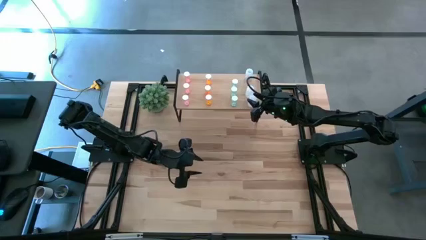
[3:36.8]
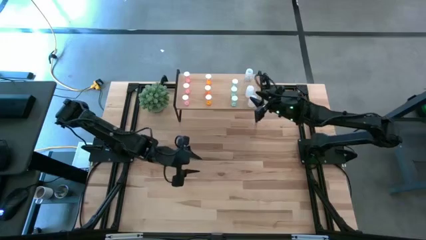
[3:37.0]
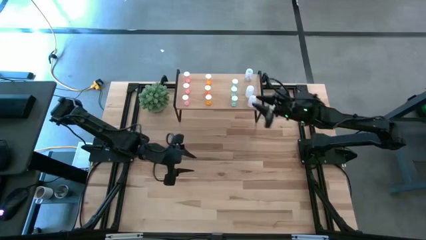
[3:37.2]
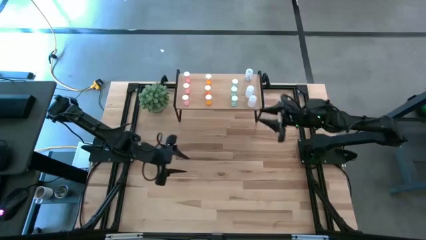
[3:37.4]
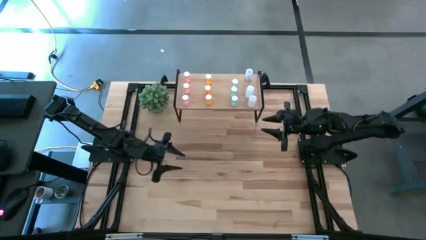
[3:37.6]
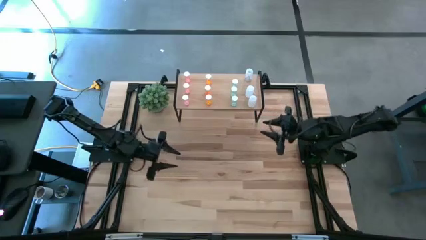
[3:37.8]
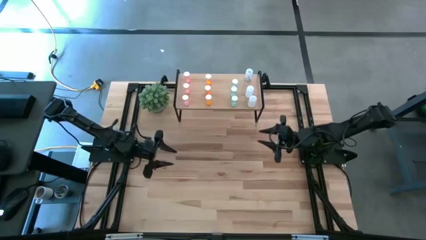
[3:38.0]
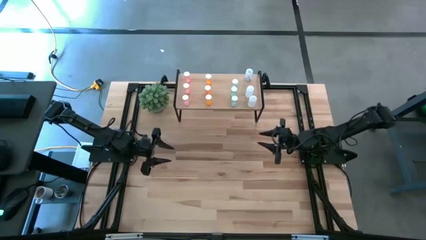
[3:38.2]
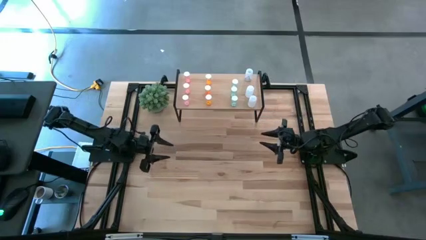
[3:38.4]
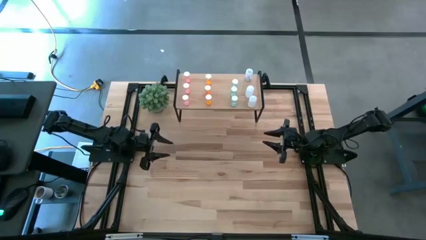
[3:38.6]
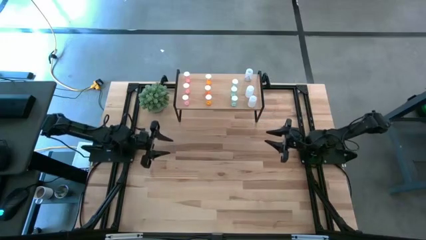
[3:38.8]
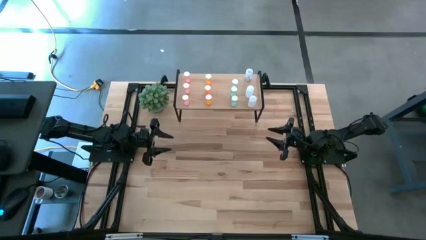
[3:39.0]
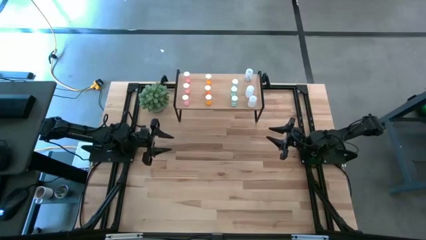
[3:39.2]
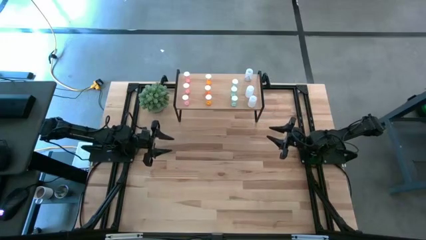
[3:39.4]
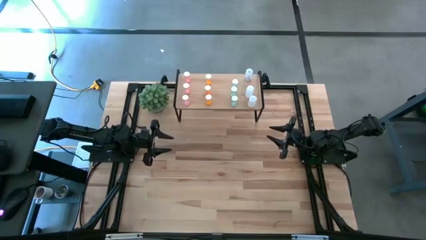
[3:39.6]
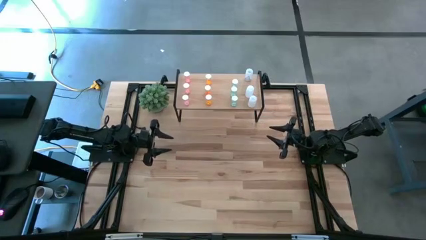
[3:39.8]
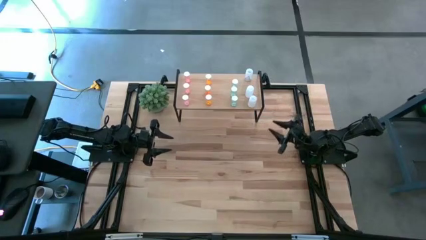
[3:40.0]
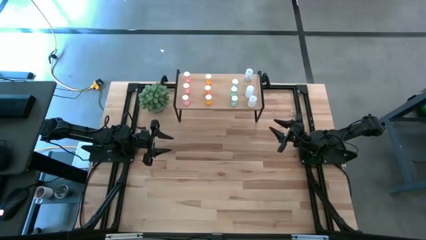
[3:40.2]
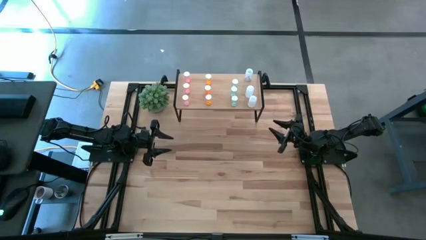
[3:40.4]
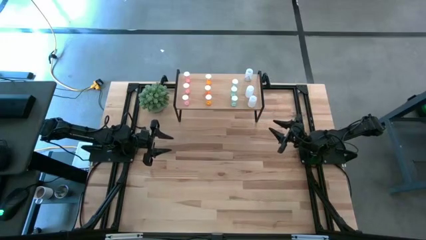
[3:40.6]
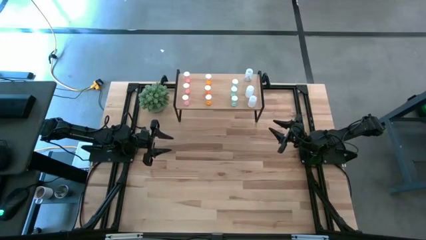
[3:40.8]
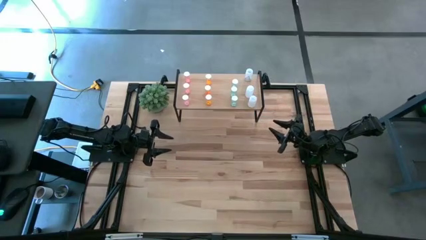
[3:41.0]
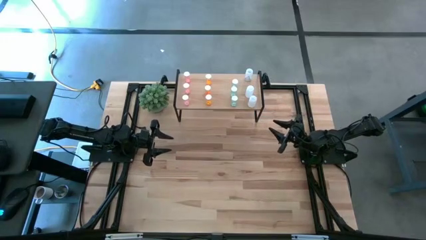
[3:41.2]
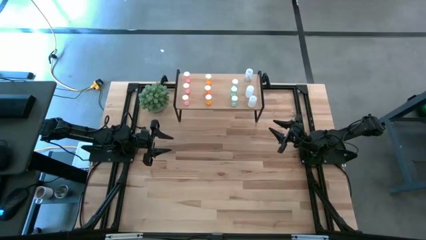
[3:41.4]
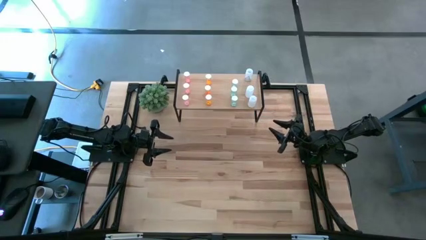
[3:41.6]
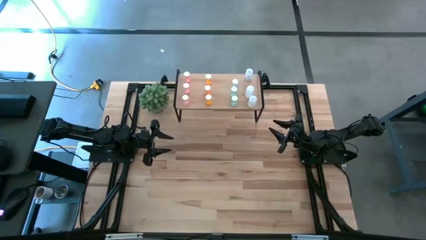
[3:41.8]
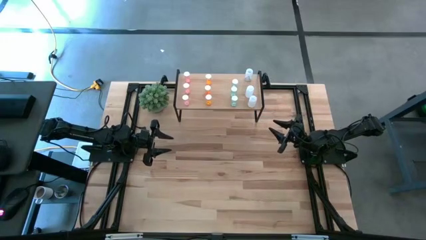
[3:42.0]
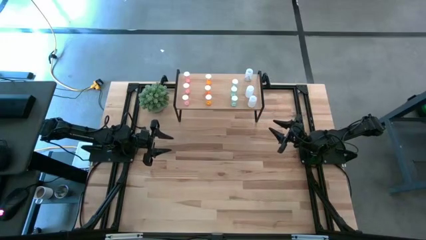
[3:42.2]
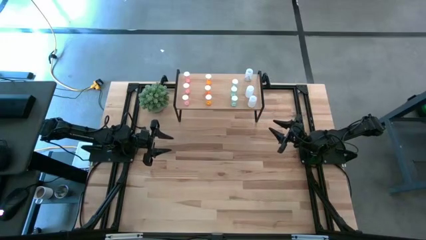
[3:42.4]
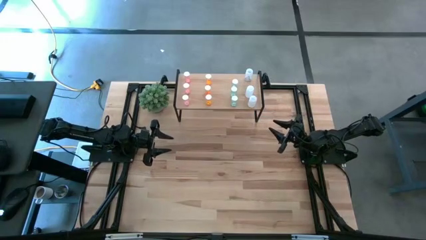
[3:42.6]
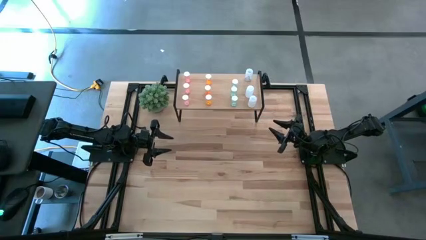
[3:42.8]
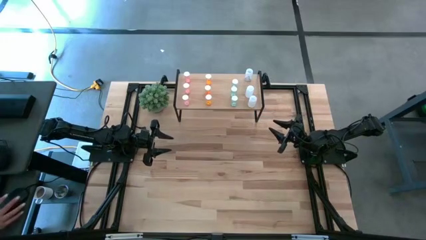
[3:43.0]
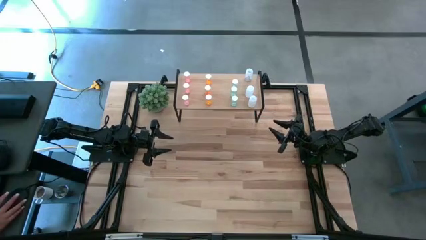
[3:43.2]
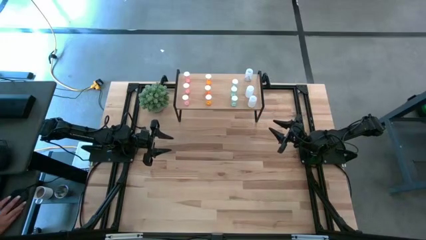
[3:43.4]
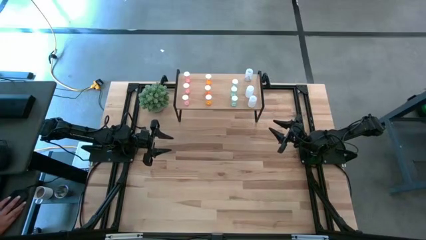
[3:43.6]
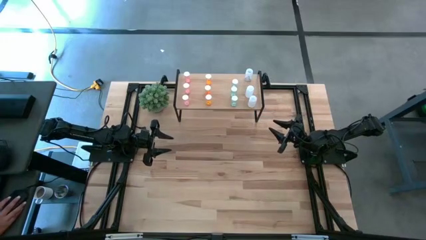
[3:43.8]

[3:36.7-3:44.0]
Task: Pick and place medicine bottles onto shelf by color
Return to Home Position

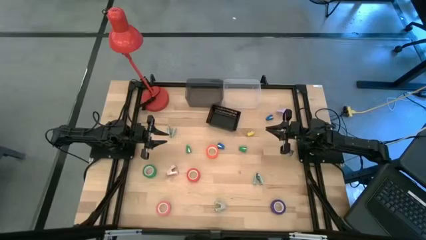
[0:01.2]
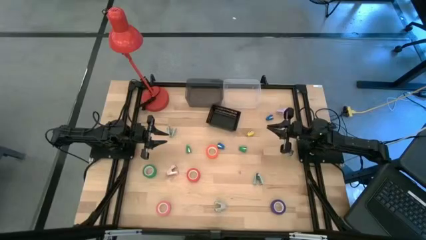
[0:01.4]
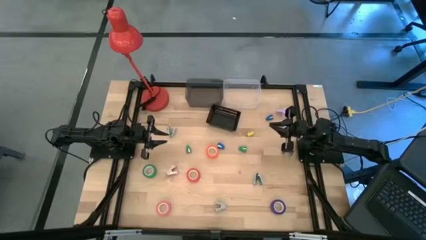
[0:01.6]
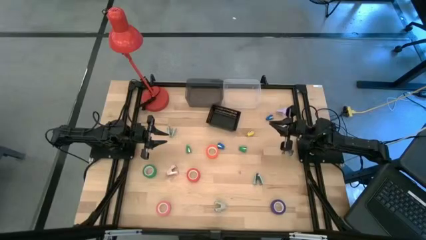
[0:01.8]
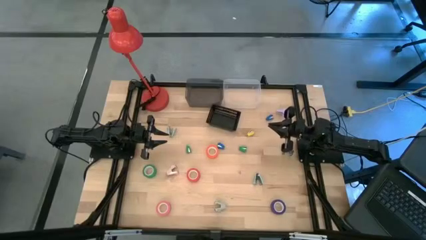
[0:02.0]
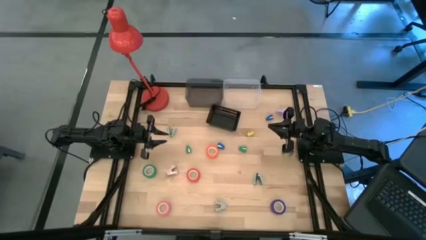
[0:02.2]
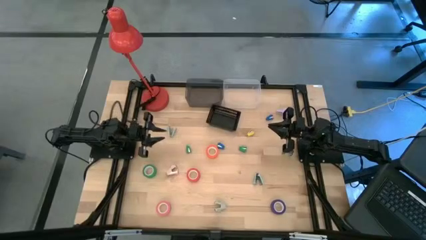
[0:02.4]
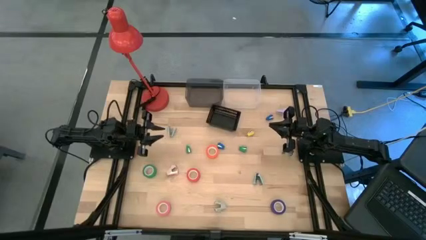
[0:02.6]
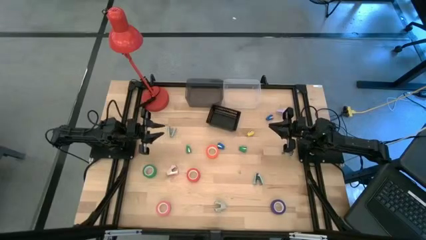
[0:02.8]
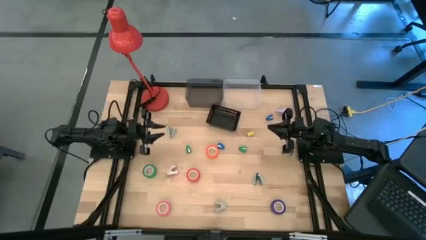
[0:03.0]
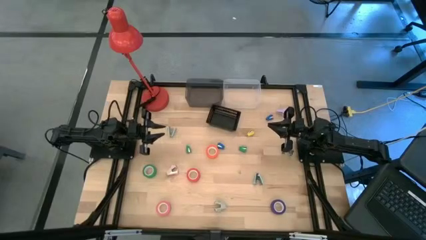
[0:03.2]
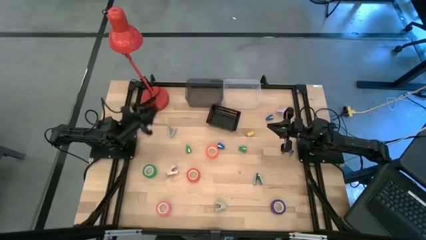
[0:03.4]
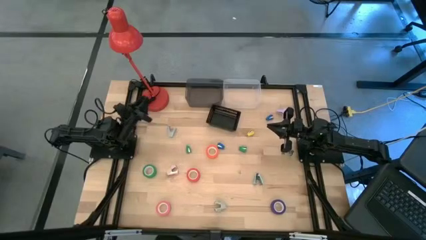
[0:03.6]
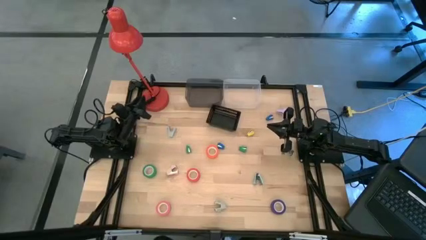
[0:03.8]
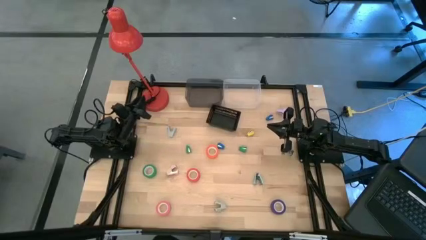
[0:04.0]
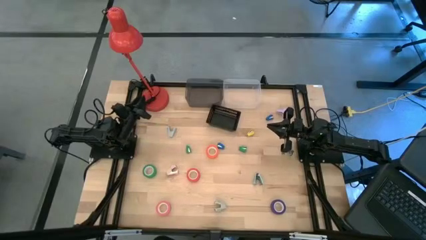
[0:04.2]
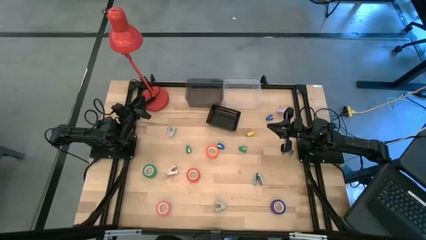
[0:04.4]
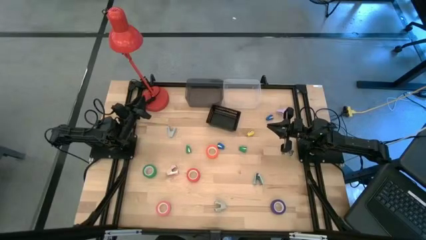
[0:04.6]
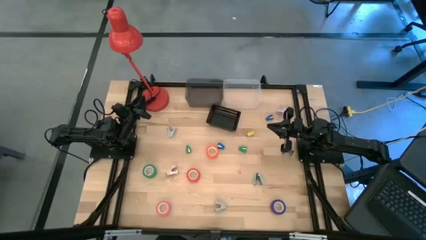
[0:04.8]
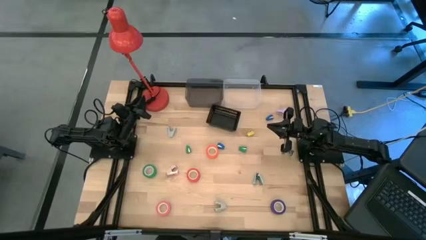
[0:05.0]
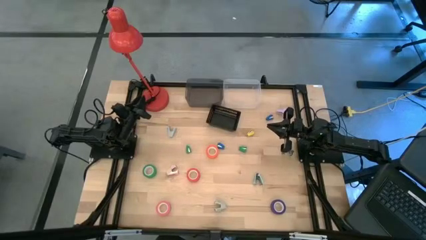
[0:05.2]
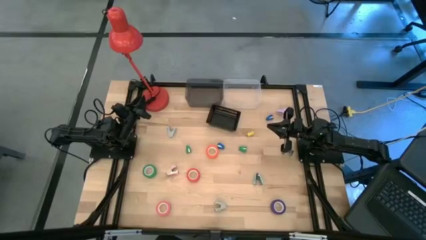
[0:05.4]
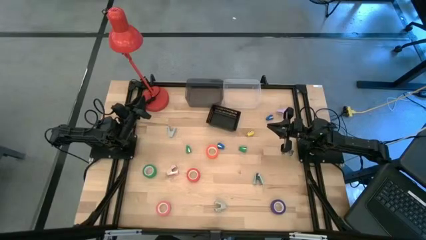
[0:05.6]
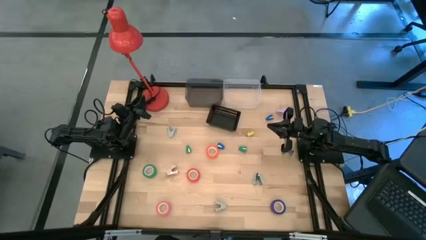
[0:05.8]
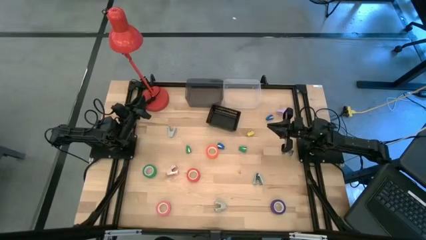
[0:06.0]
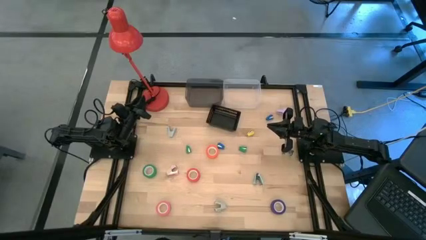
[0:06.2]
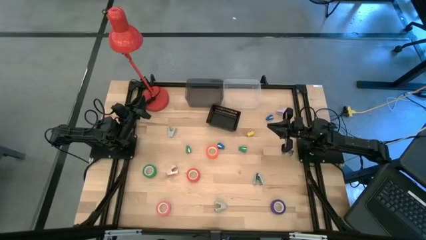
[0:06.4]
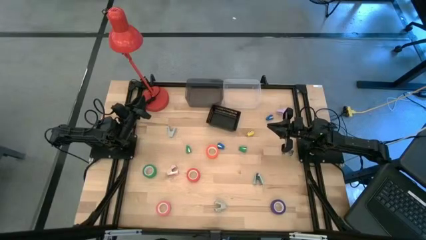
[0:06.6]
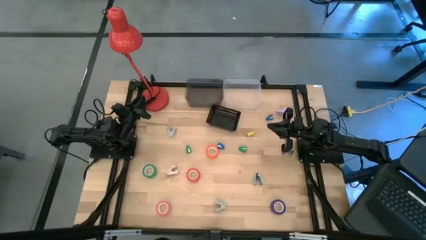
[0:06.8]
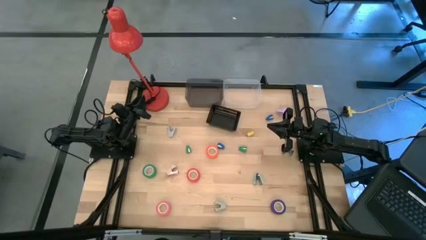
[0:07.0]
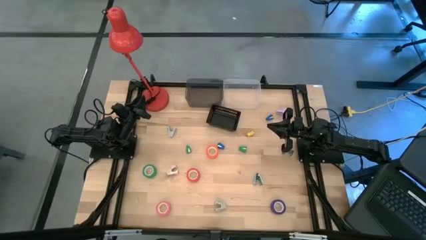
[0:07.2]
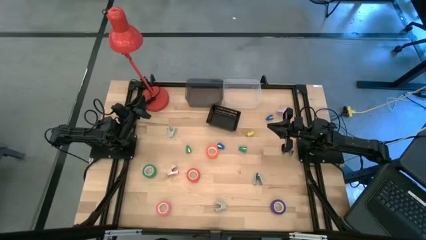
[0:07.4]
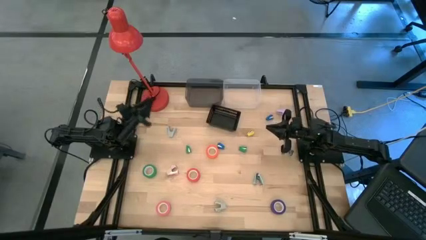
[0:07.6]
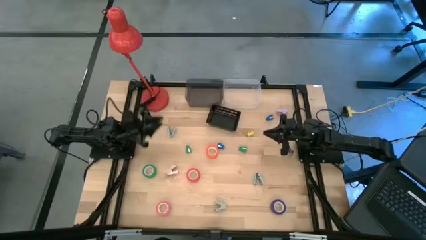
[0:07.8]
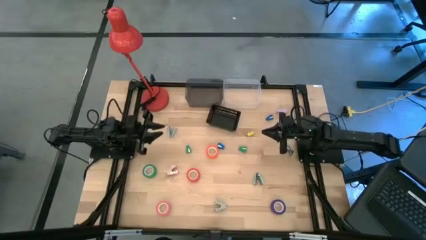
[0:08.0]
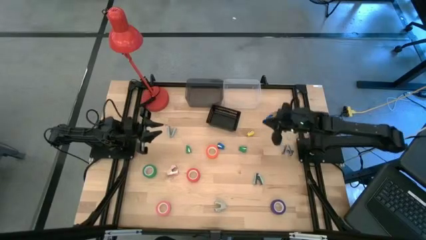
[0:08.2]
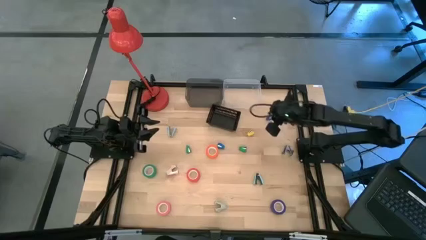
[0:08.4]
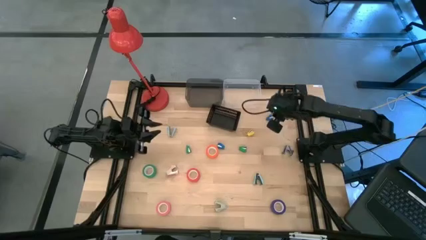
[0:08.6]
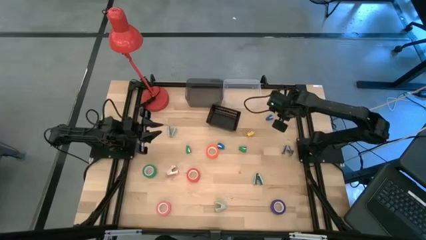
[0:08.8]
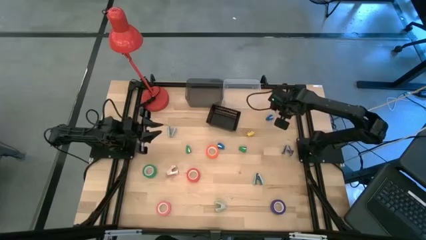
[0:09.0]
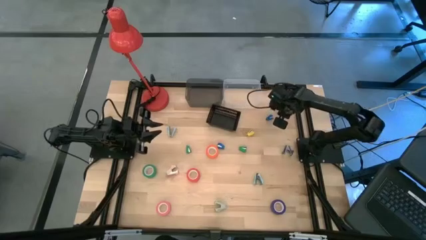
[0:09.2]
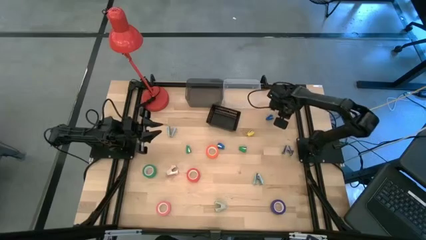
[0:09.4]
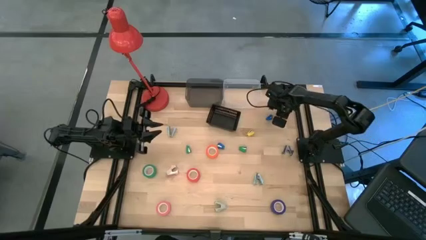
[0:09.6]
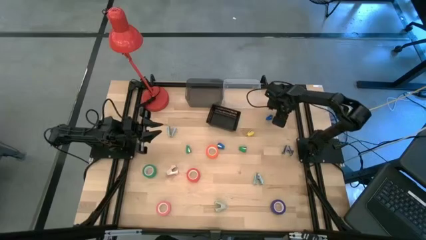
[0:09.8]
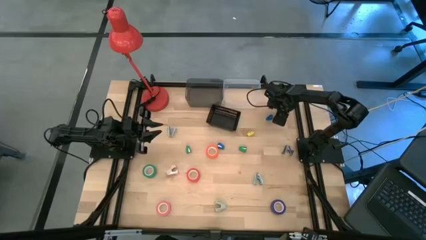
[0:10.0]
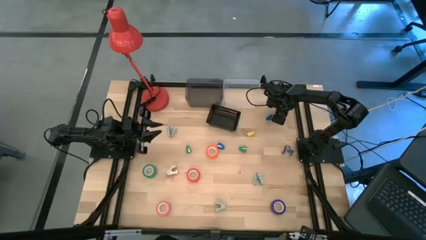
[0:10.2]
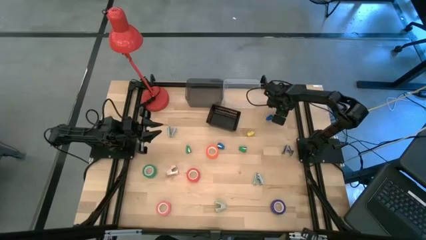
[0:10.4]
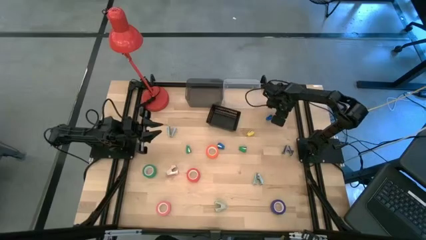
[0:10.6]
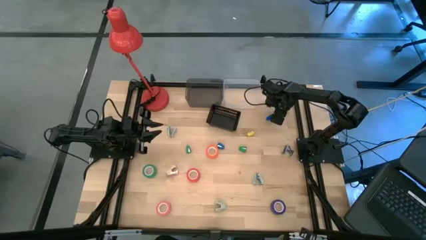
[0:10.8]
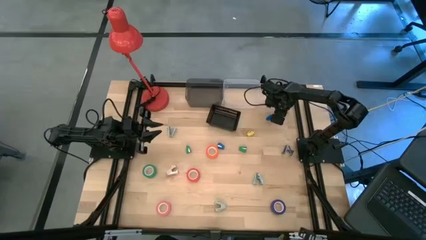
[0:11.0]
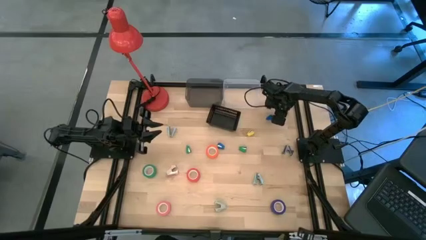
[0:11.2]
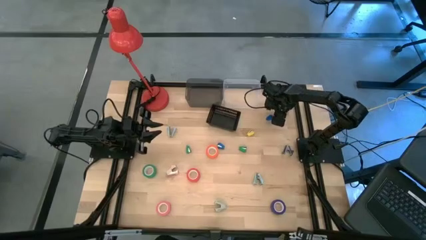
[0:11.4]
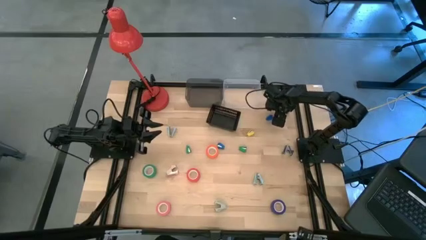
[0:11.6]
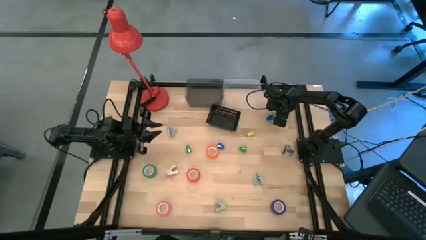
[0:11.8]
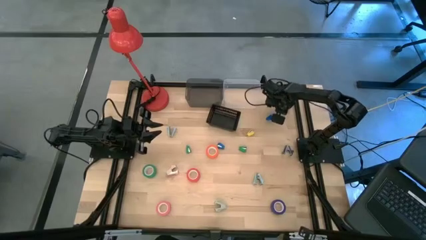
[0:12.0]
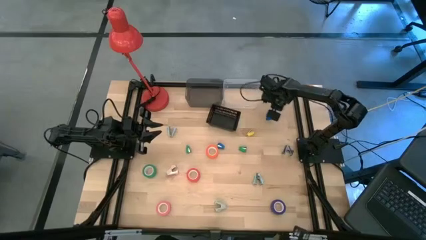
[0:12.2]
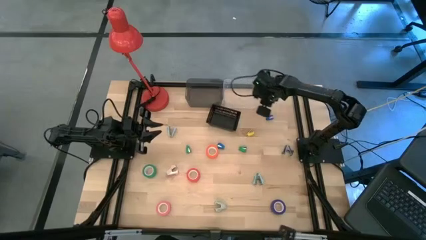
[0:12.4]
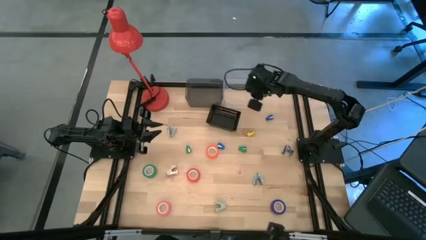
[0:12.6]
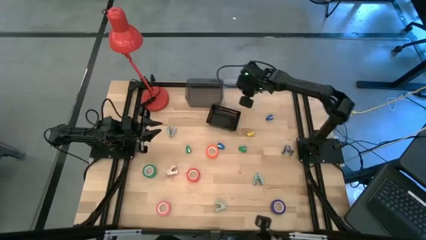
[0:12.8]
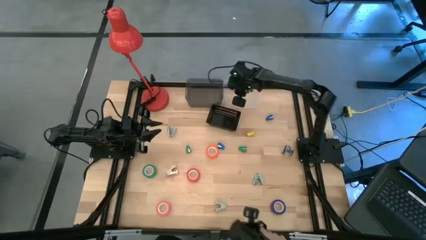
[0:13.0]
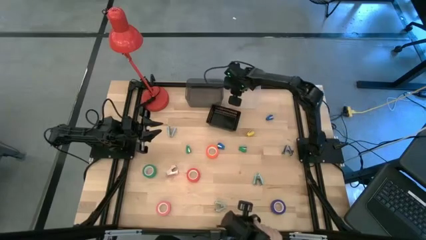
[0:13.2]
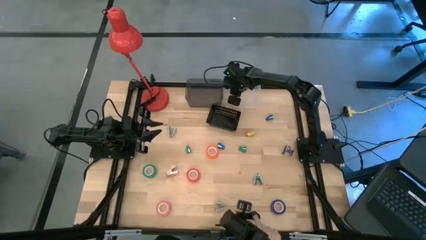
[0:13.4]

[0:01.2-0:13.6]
Task: Pick and place Stapler, Stapler remover, tape
Put the purple staple remover into the transparent bin
